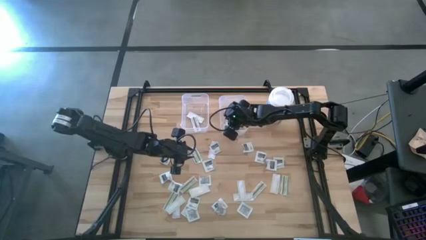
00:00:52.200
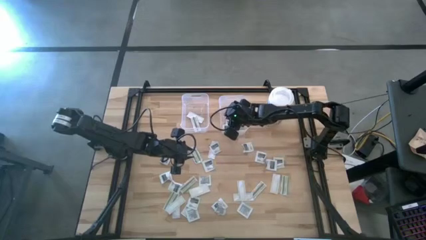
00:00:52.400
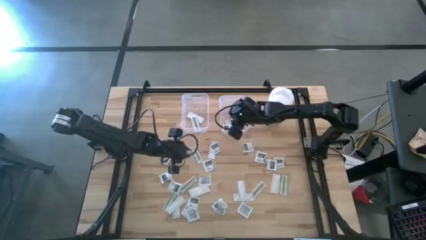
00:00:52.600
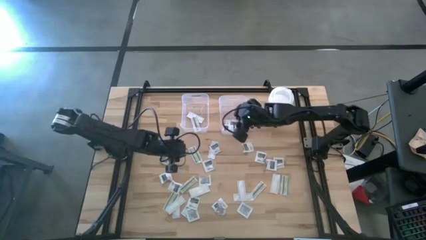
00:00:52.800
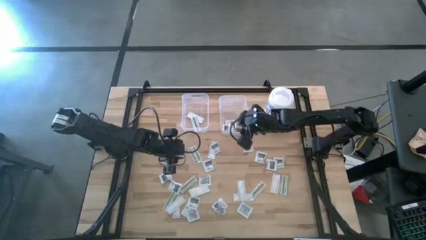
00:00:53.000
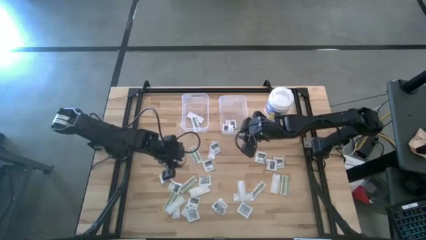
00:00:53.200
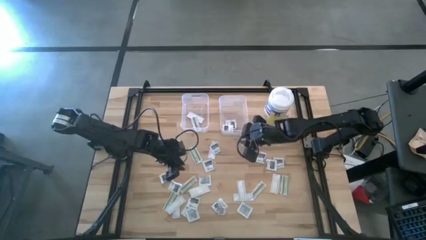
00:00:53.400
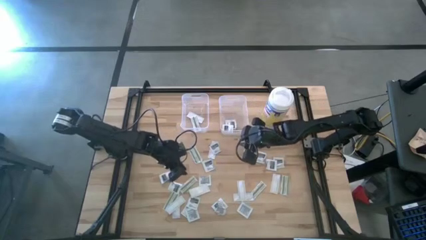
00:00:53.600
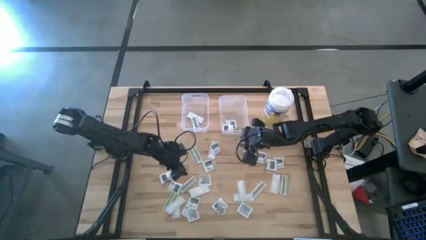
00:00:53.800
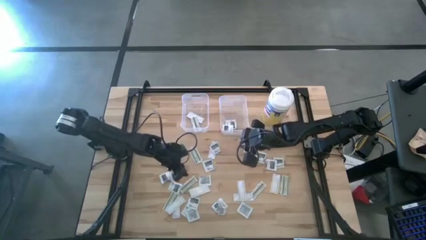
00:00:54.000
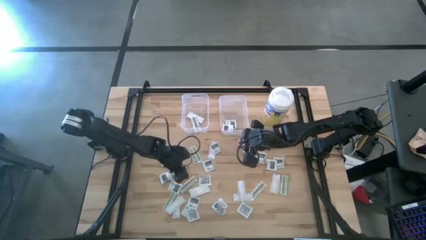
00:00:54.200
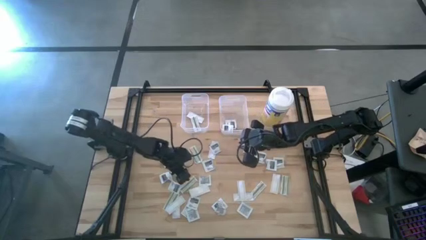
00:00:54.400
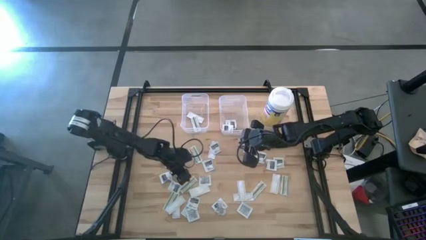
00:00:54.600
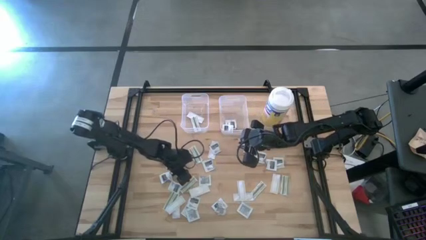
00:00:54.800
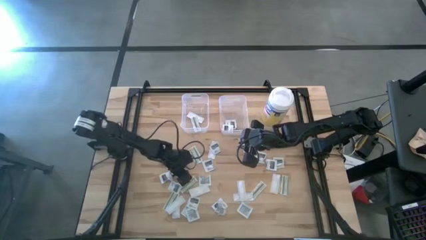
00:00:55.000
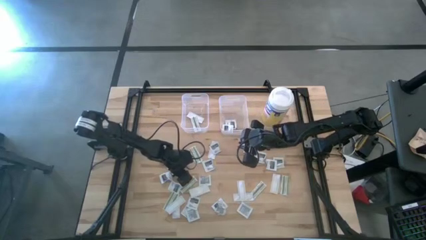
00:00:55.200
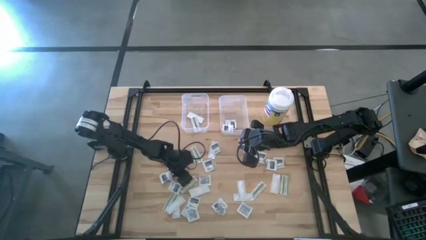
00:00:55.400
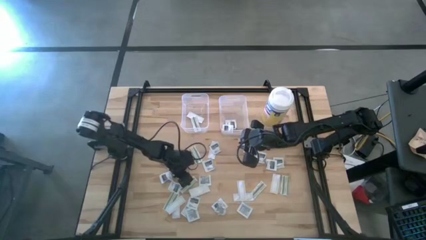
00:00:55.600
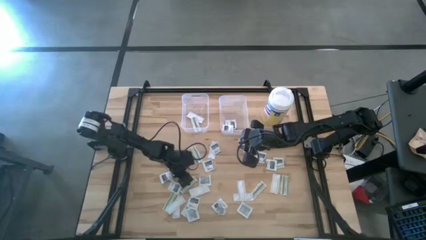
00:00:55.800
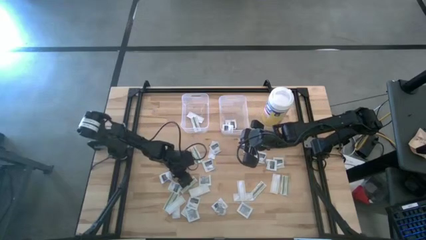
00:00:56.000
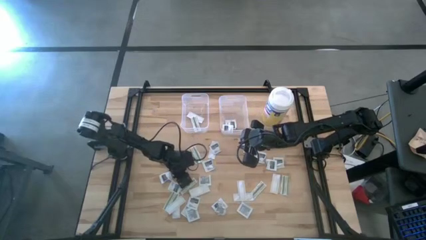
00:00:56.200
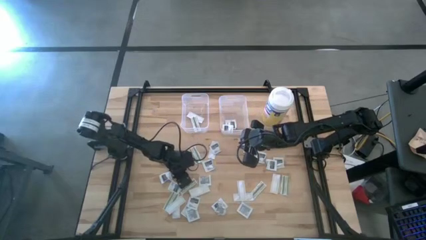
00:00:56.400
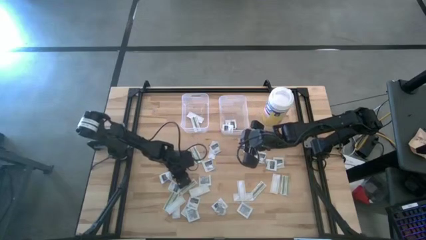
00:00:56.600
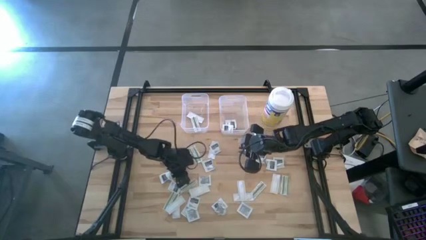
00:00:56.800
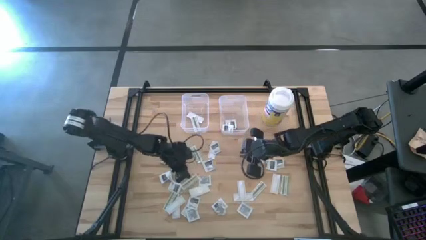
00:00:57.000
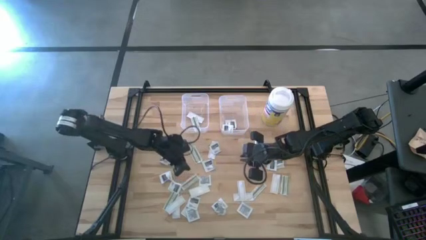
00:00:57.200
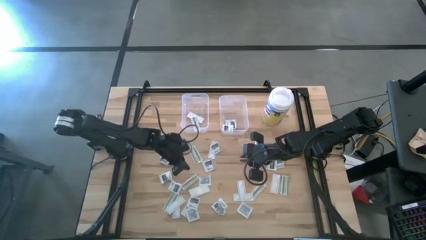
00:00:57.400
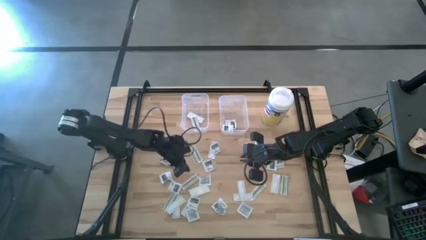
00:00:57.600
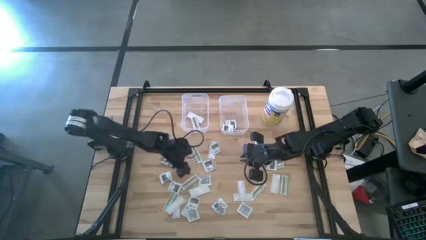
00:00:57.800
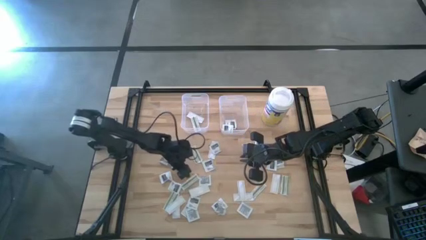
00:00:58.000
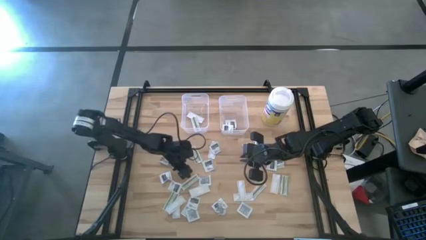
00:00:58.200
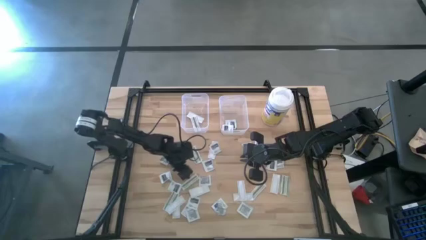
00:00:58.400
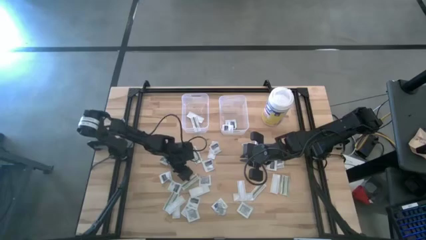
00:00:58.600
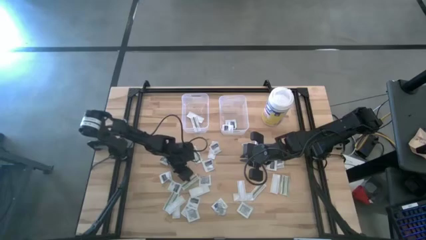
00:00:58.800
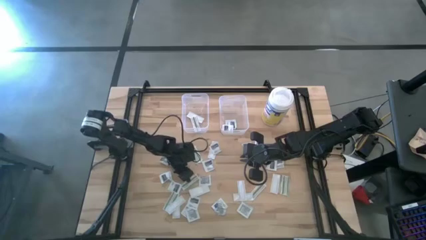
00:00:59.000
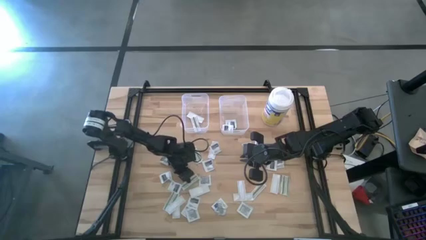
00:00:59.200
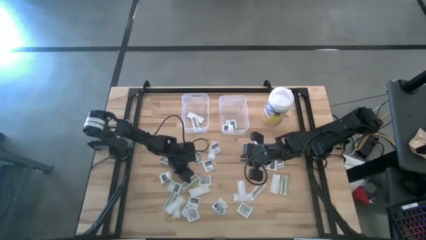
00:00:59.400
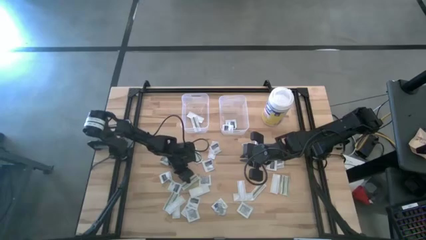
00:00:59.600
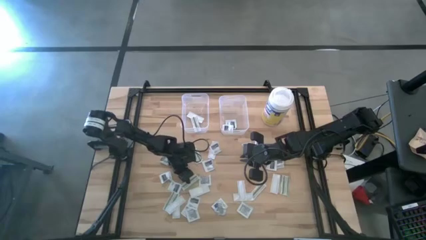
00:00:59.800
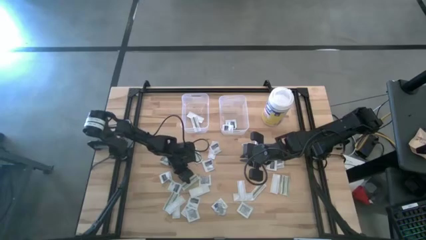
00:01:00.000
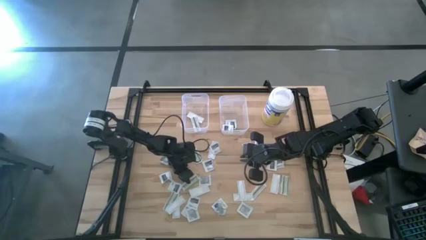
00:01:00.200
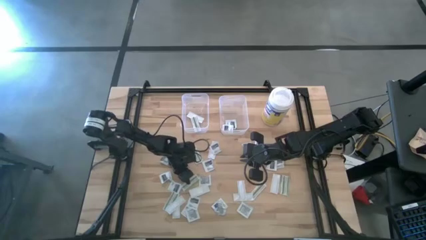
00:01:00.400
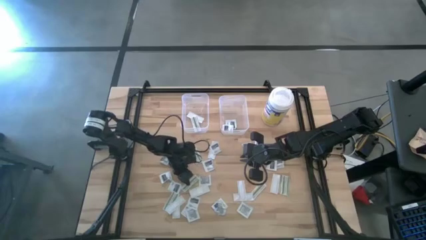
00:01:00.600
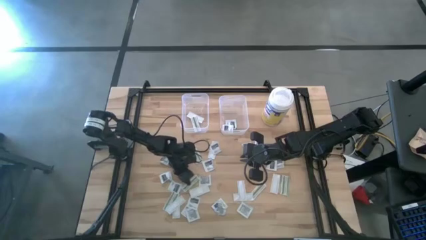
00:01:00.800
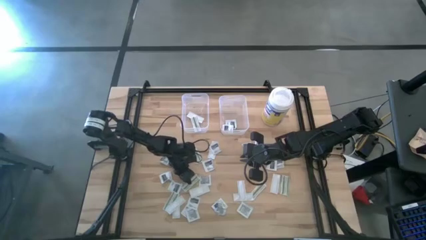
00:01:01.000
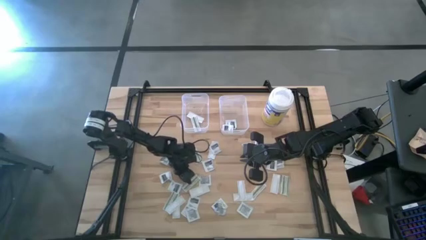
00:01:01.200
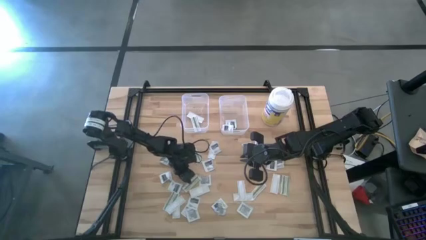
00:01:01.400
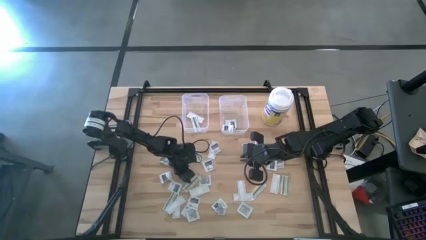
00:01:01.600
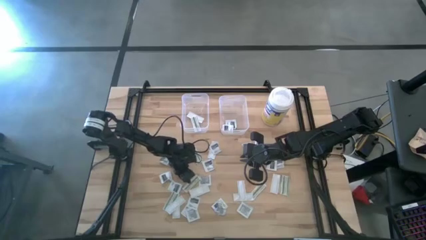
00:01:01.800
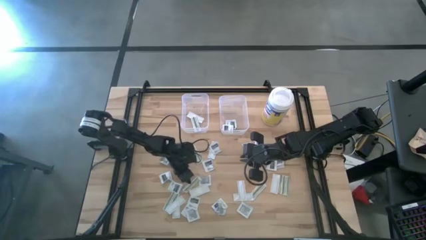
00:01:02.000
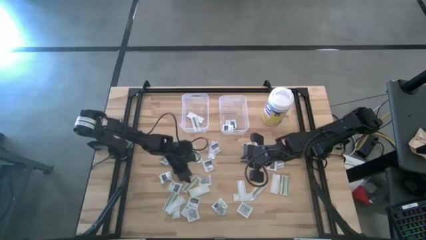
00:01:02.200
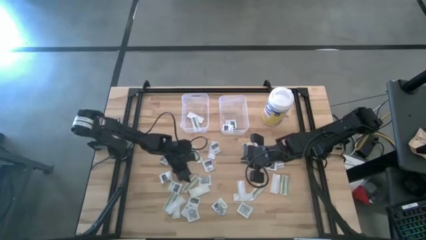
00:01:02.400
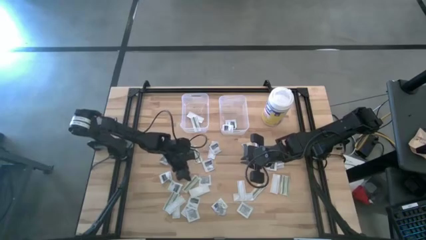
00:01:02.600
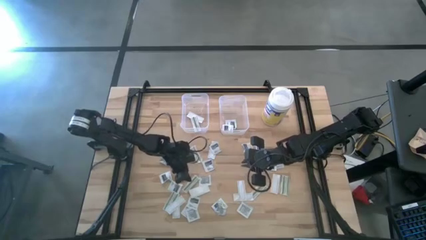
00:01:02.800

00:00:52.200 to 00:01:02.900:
Task: Pick & Place First Aid Supplies
Put the green bandage pack into the left transparent bin

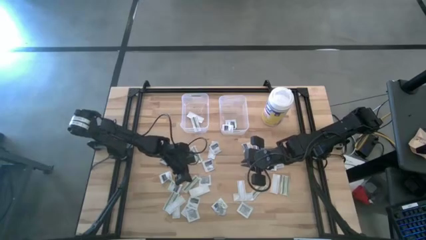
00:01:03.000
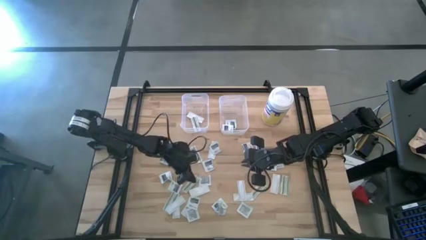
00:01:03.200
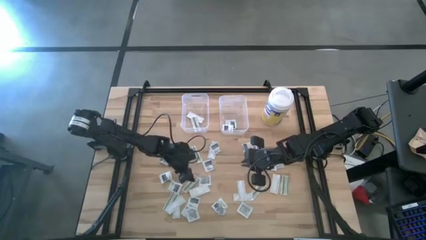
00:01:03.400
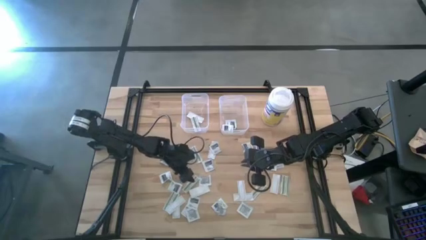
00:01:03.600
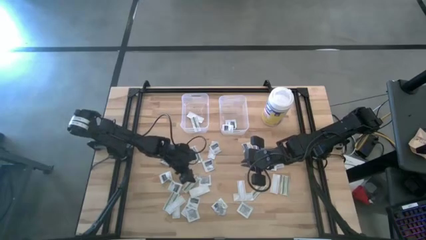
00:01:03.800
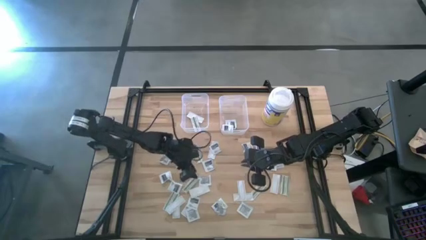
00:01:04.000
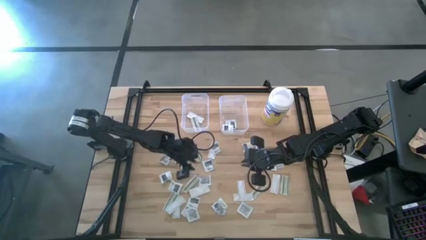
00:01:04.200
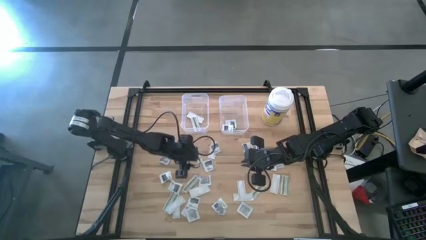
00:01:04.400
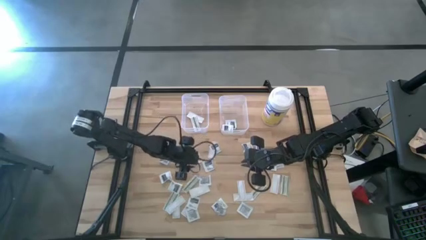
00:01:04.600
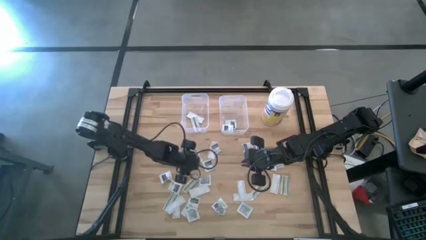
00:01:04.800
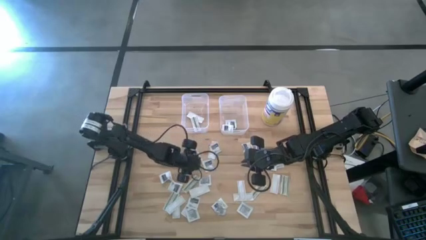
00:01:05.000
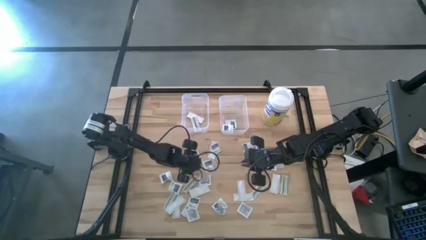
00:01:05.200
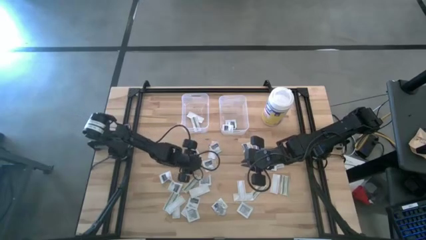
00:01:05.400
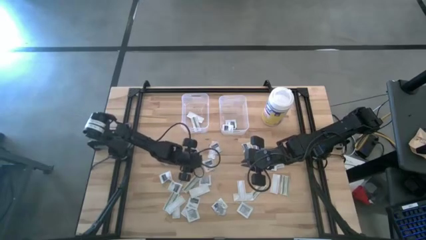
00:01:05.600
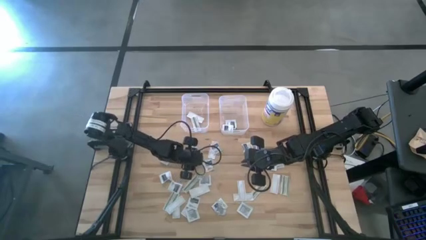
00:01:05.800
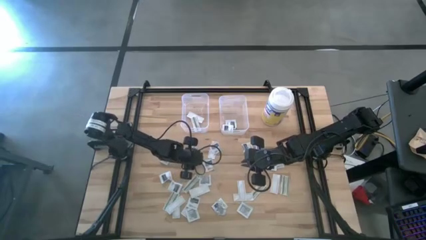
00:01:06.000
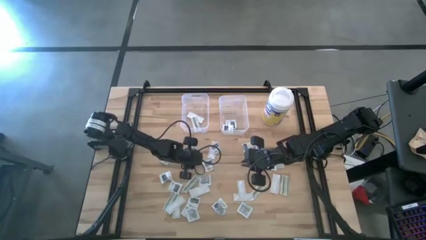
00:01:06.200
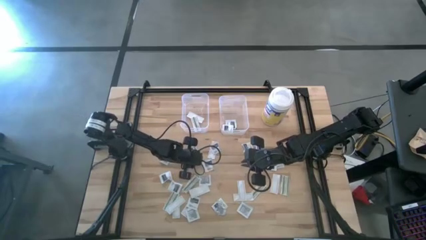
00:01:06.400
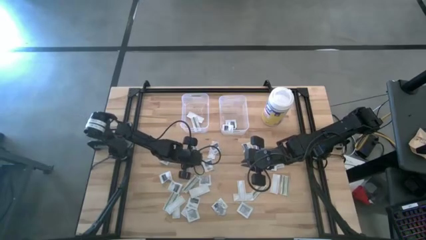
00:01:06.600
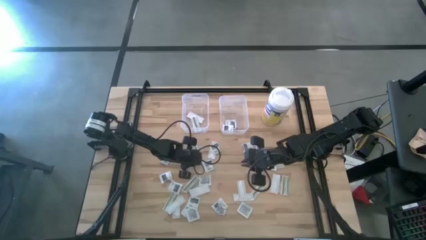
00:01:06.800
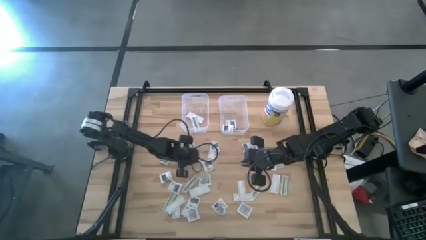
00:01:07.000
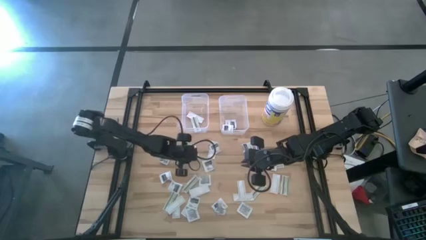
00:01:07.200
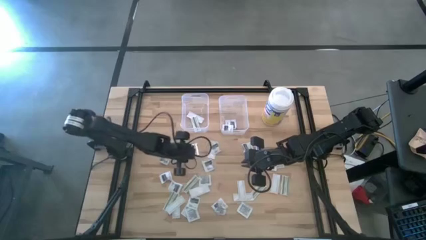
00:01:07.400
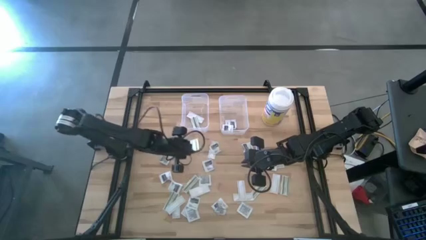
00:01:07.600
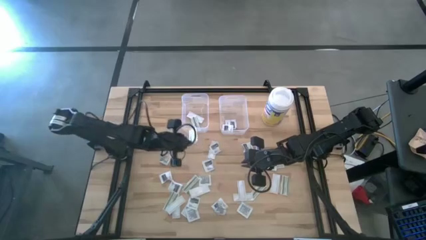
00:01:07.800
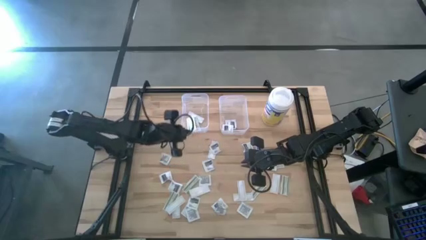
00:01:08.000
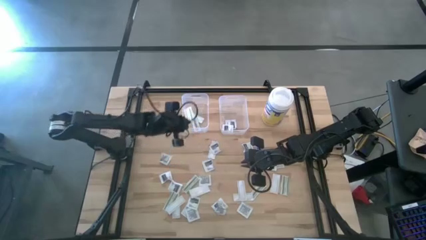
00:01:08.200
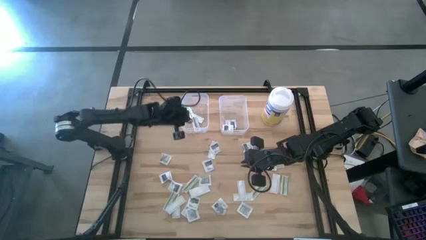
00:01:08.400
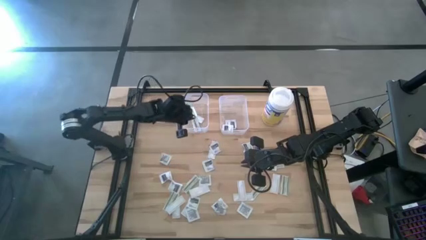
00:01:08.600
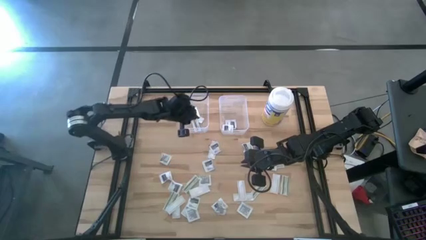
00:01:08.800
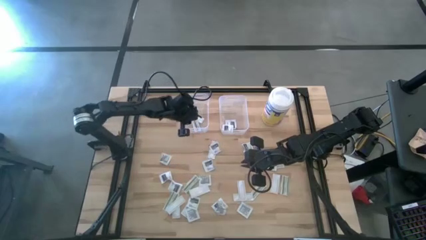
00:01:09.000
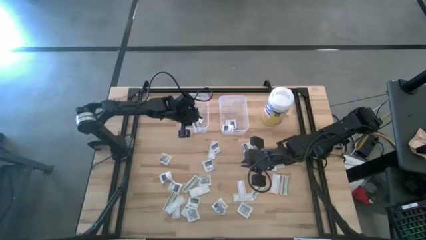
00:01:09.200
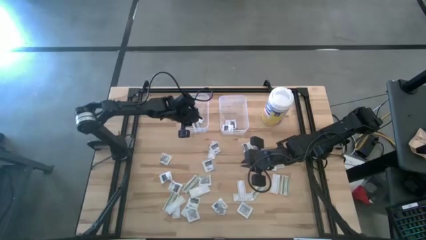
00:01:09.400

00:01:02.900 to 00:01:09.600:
Put the green bandage pack into the left transparent bin
